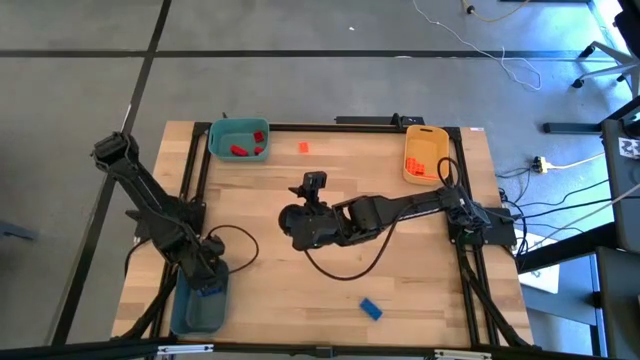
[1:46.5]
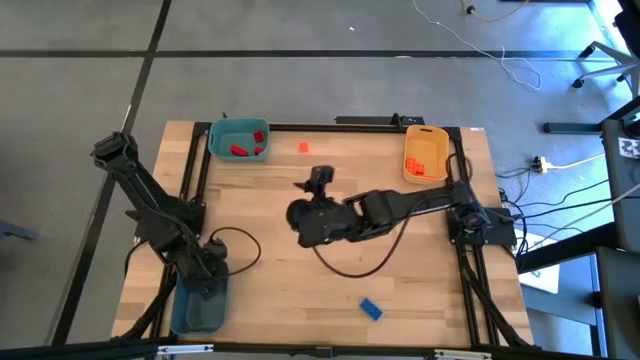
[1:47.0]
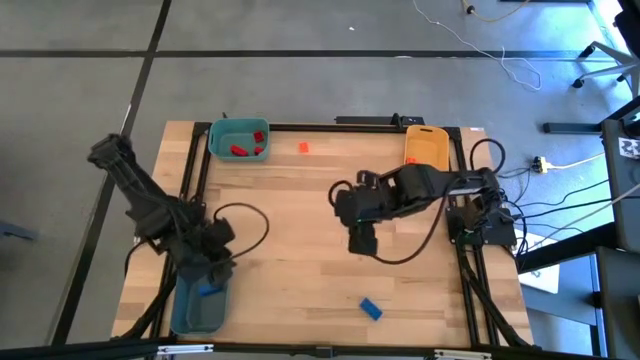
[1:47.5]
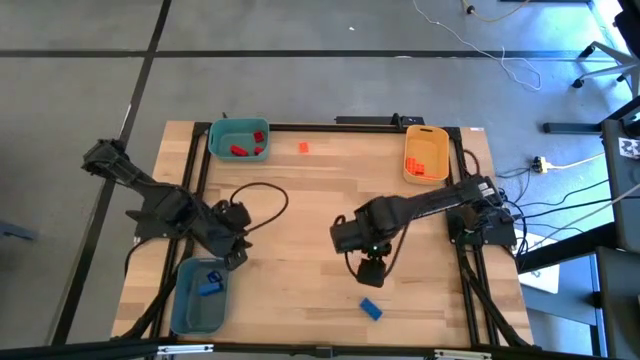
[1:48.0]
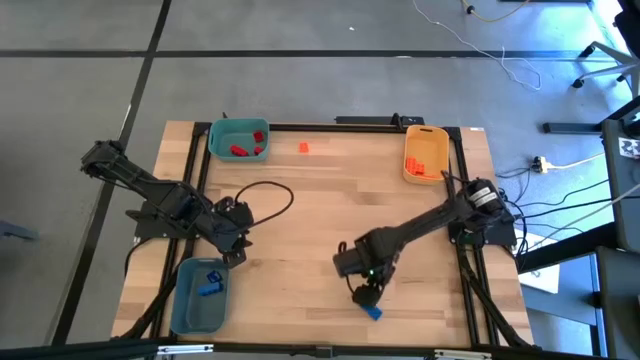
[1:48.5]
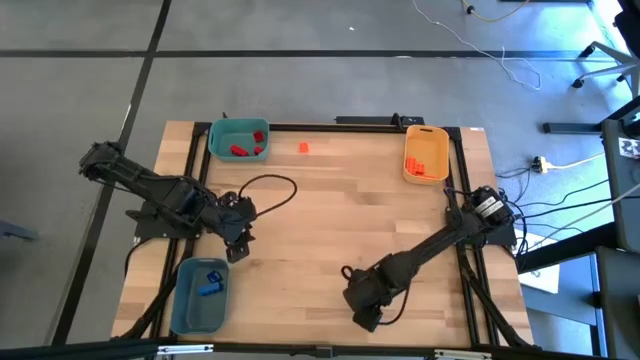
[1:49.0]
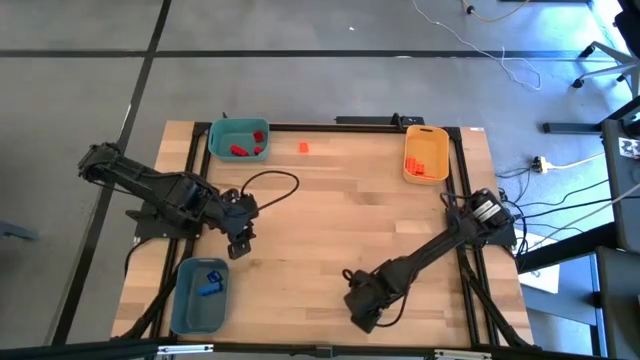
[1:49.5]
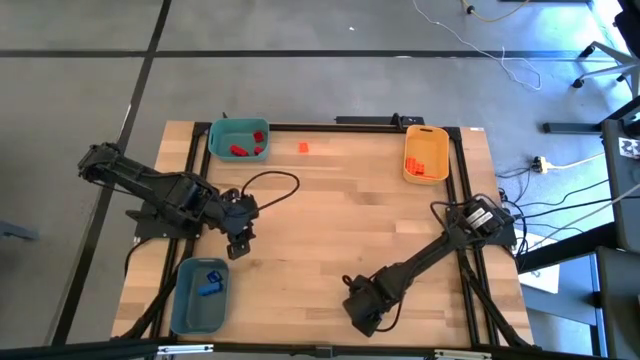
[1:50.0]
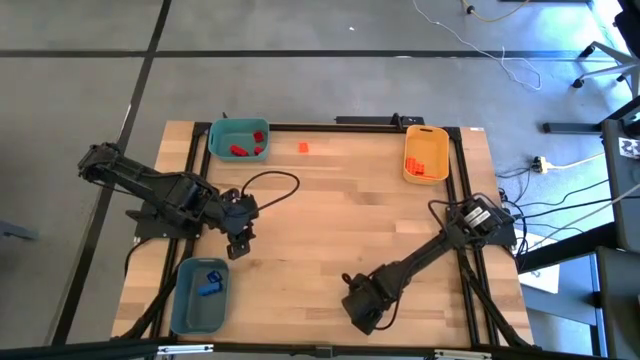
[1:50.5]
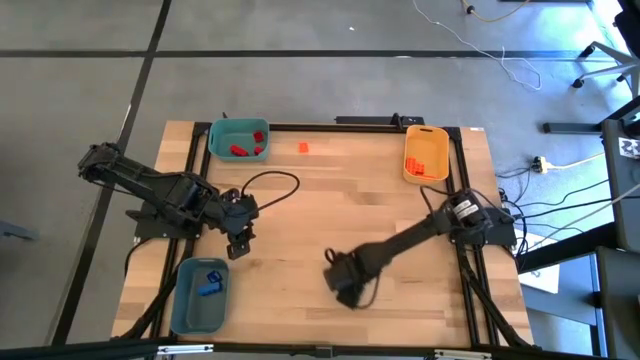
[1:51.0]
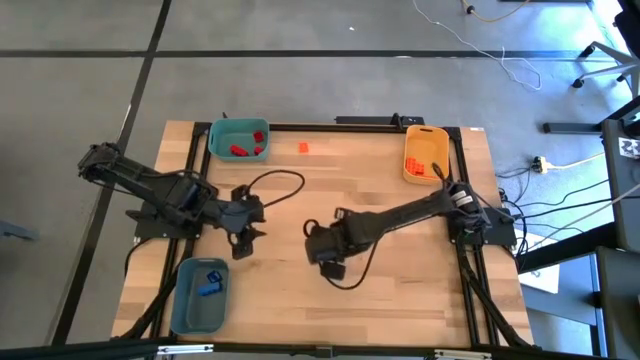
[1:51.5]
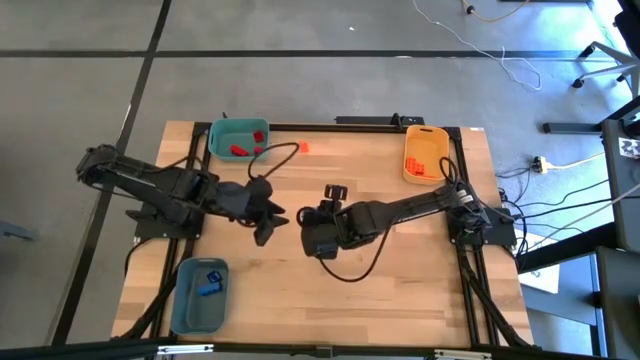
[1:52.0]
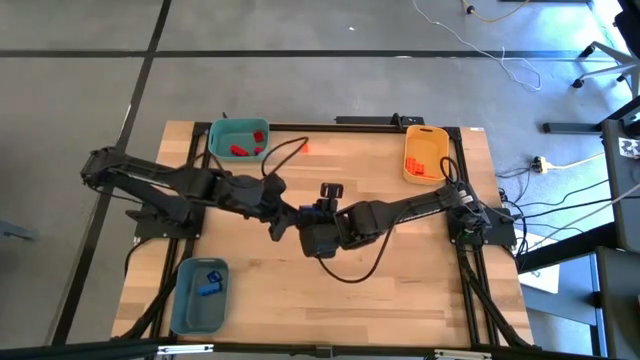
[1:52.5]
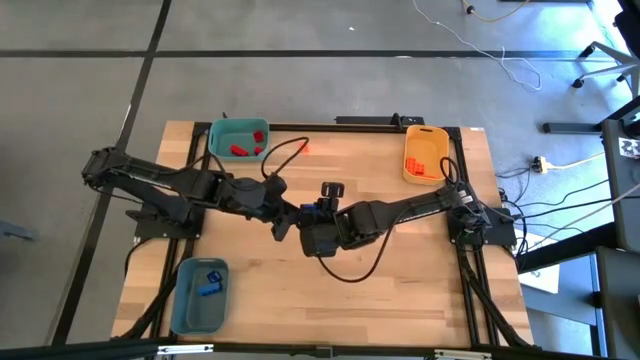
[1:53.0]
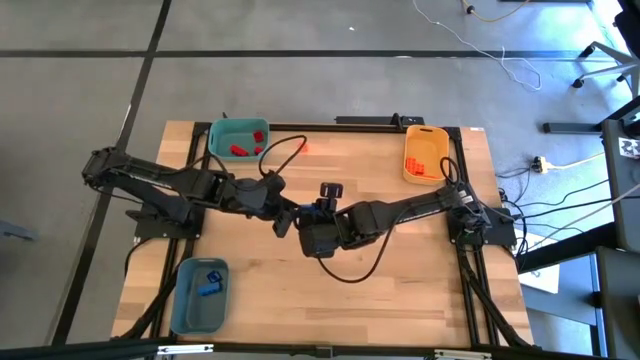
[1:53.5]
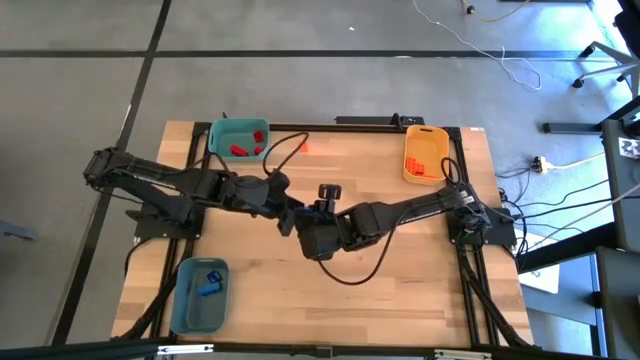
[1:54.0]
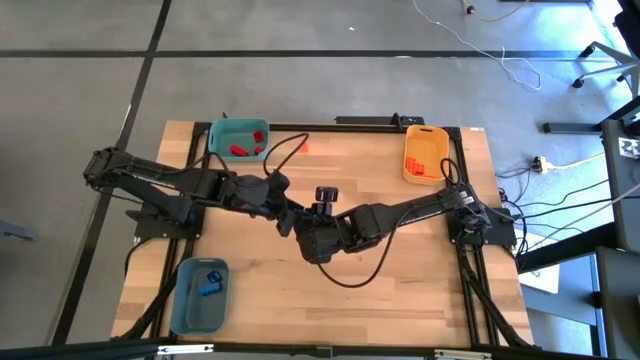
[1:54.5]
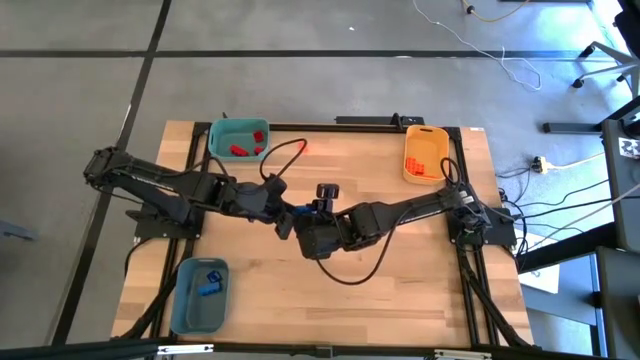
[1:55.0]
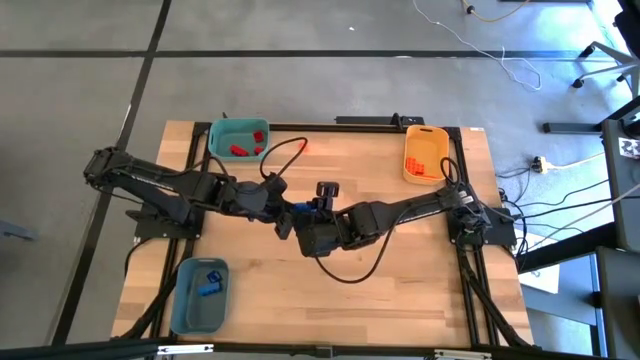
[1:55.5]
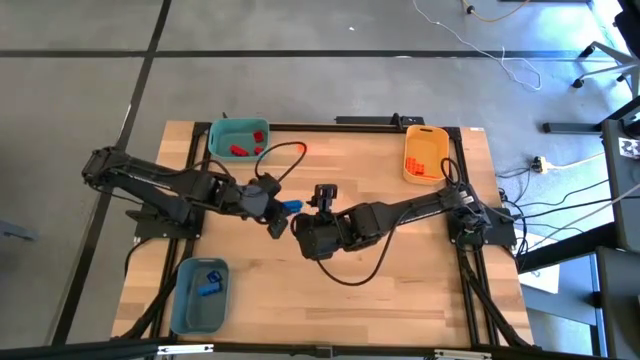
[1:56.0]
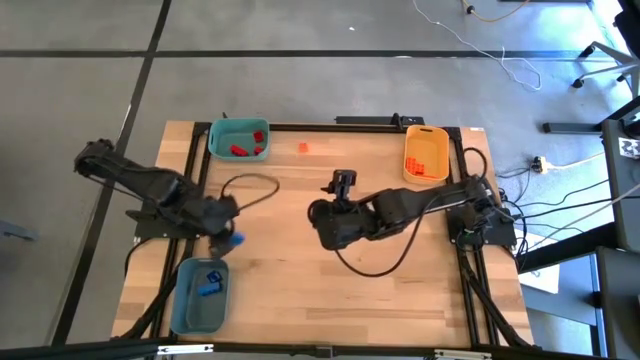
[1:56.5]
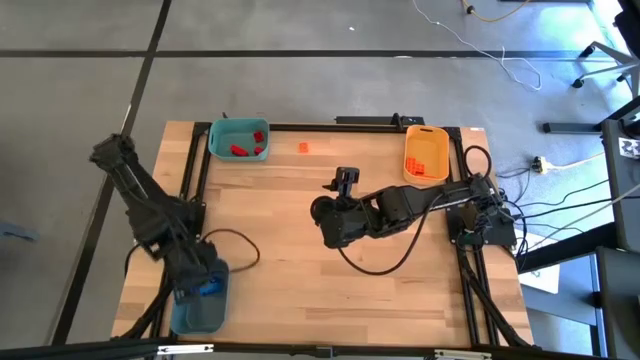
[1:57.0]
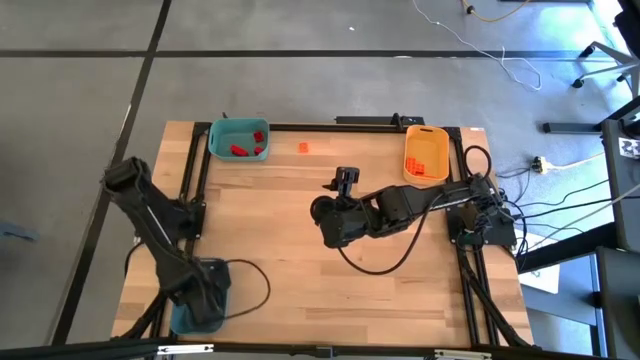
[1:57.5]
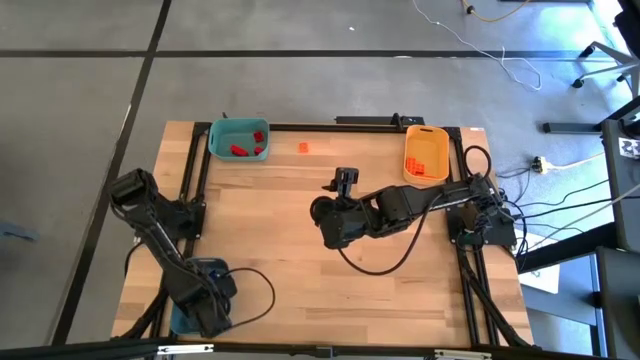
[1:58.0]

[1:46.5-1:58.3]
Task: Sort & place blocks by color
Put the blue game piece into the gray bin

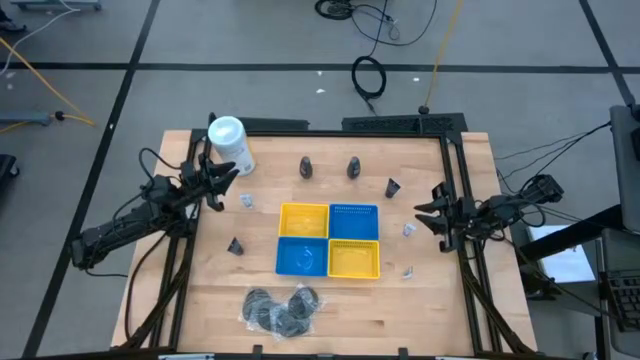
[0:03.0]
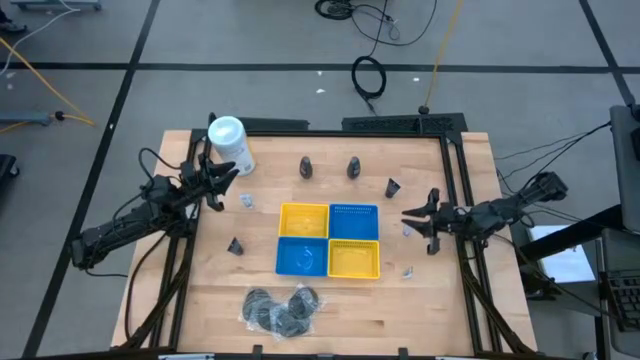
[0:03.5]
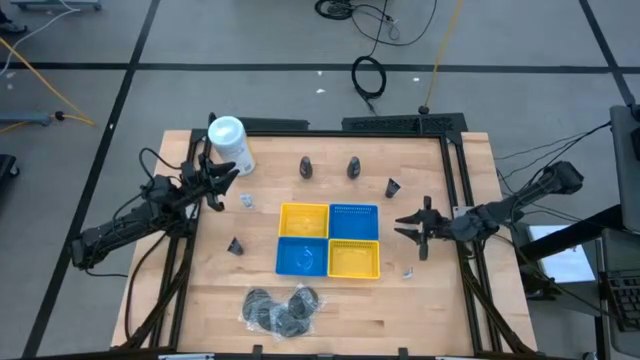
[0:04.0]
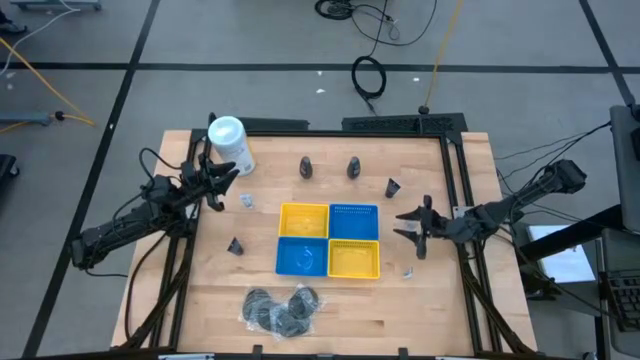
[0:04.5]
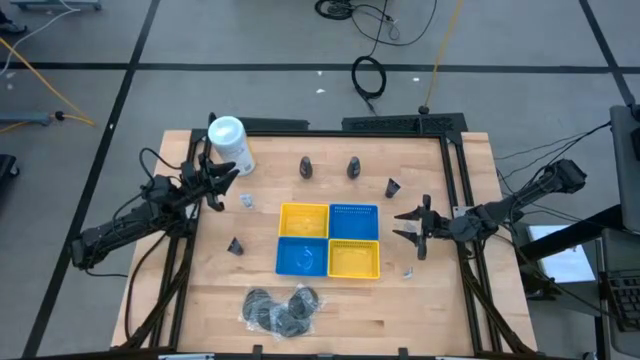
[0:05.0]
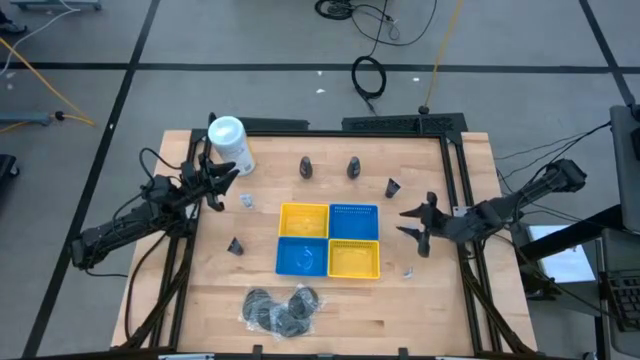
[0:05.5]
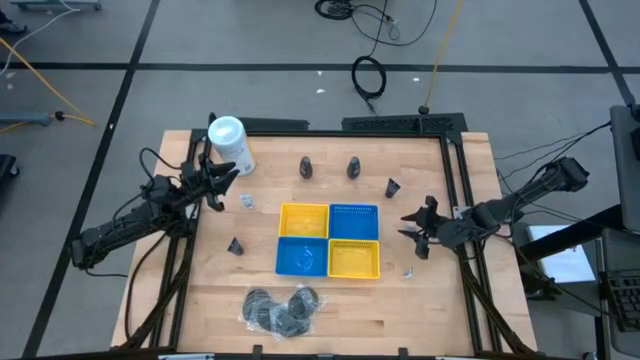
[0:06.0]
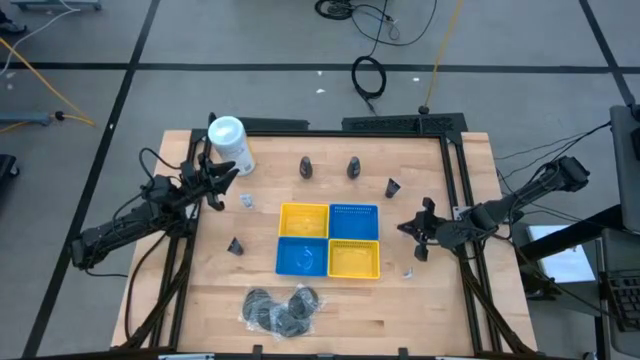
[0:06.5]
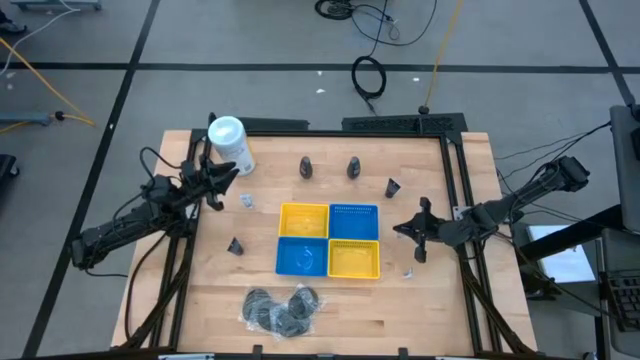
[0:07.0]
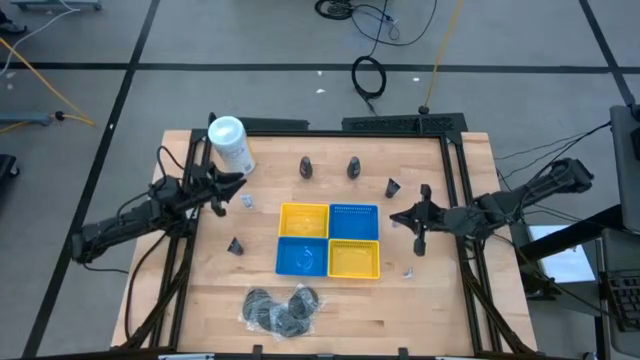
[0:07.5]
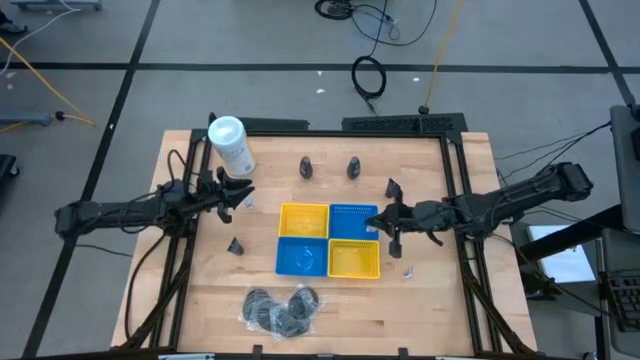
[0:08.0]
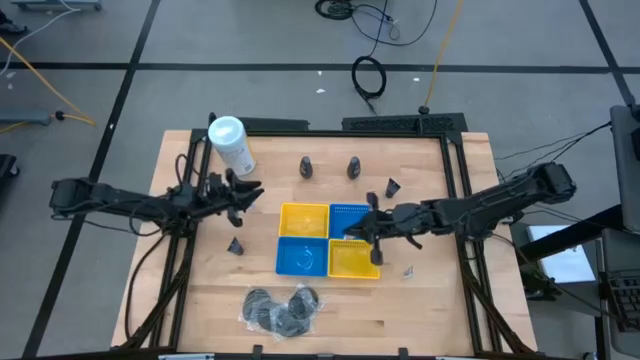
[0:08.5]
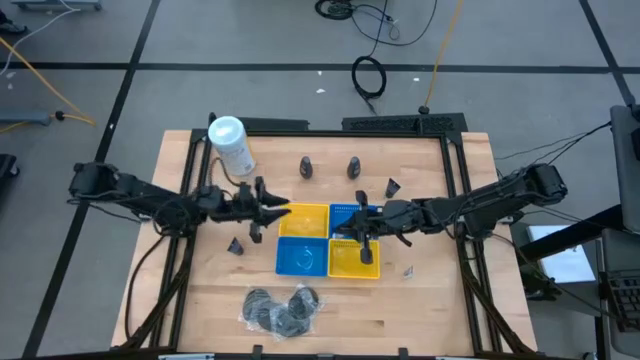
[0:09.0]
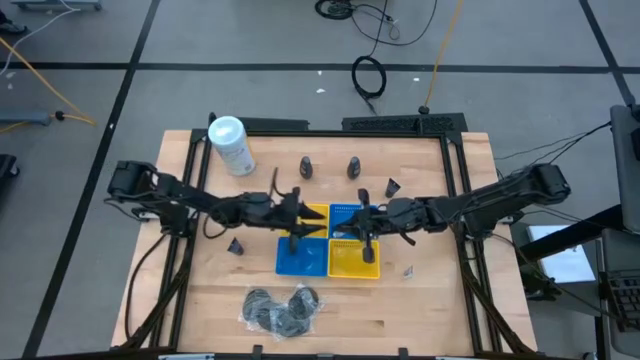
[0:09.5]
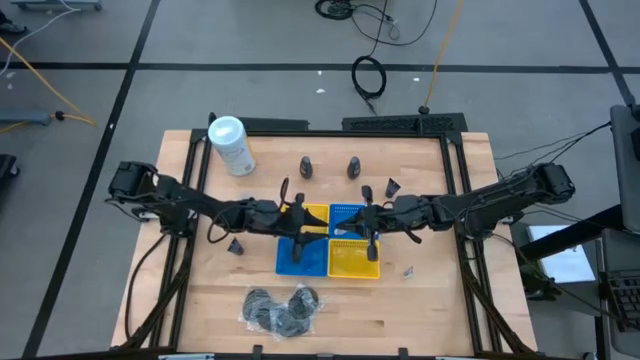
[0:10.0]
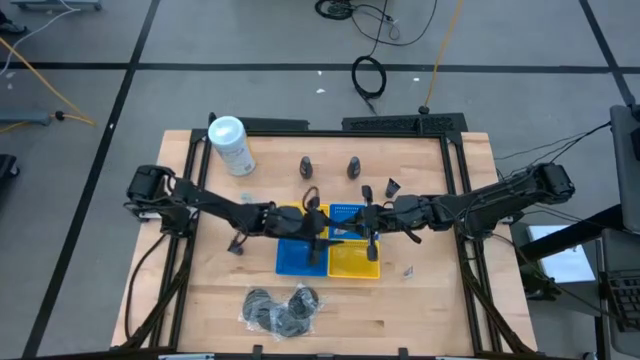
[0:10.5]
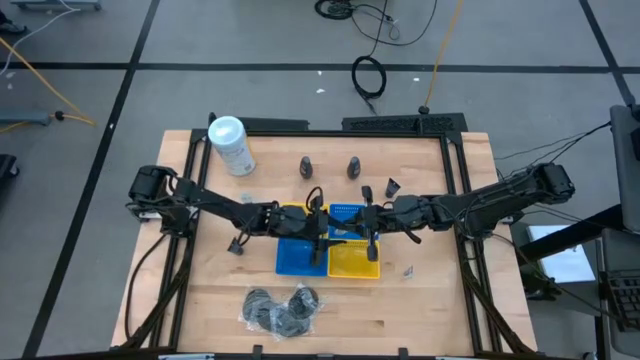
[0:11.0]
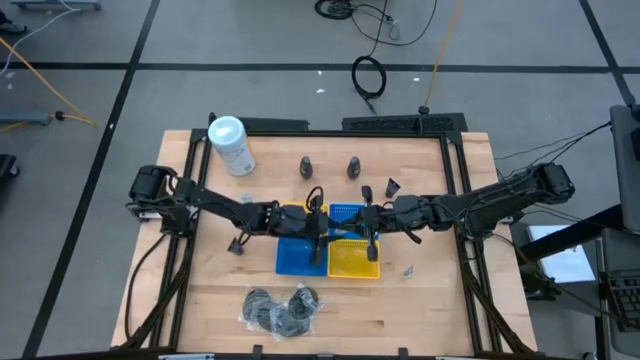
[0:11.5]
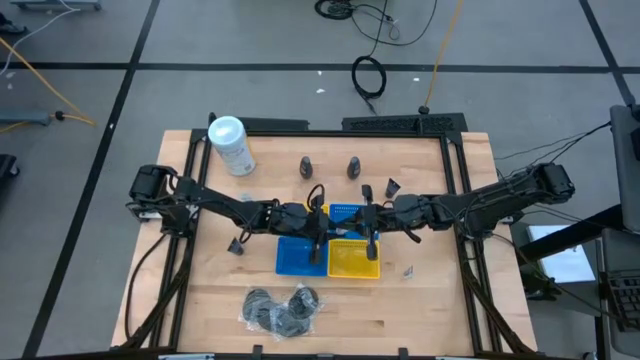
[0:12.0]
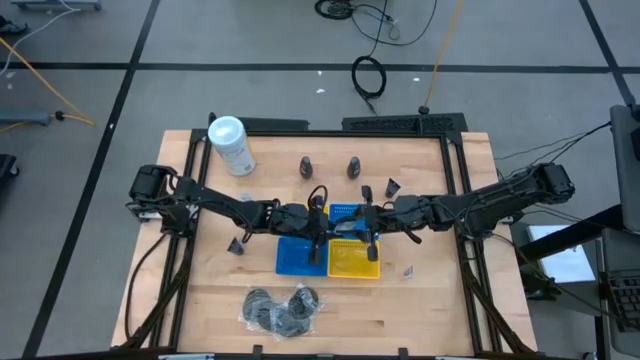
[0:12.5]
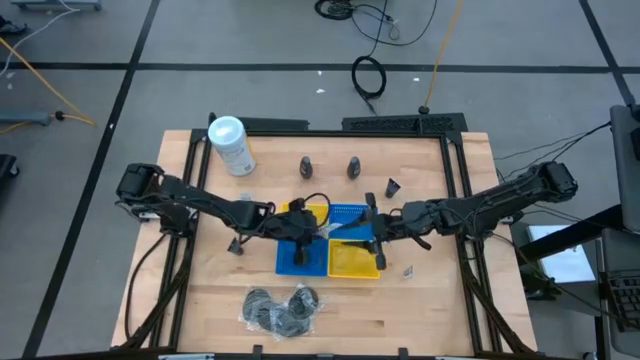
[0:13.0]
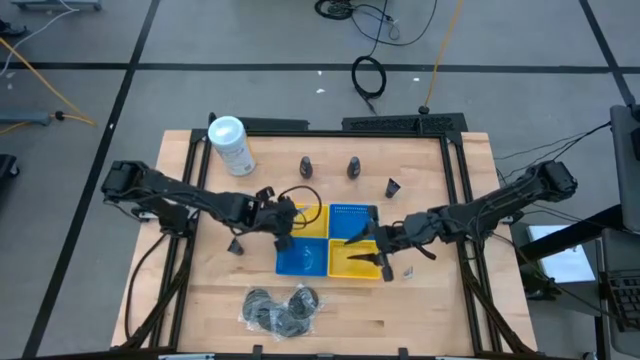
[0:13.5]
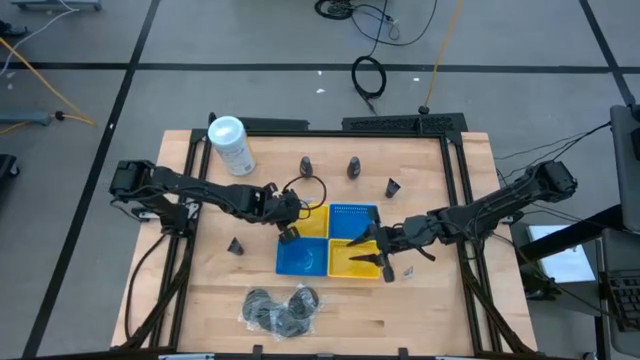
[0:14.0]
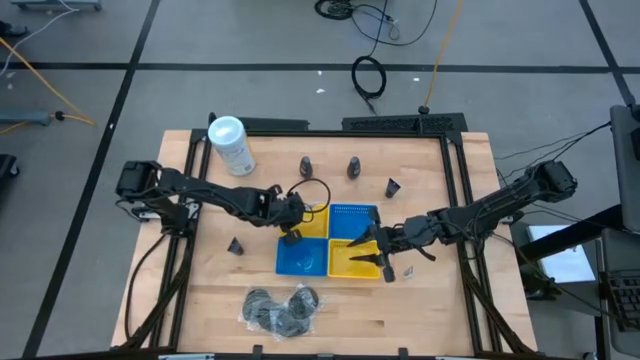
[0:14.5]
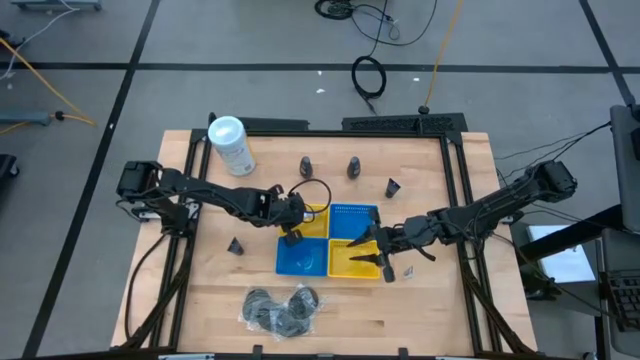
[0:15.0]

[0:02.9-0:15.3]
Task: Pick & Place Travel size toiletries
Put the white toothpaste into the left yellow bin
